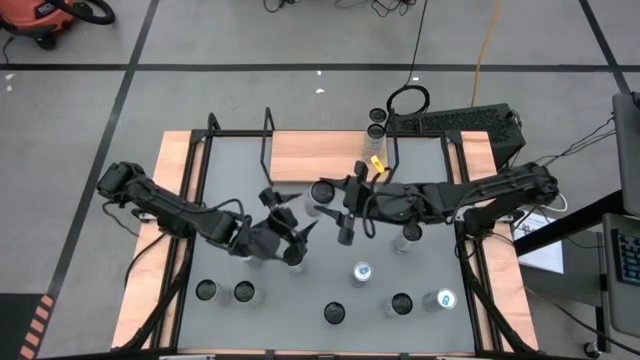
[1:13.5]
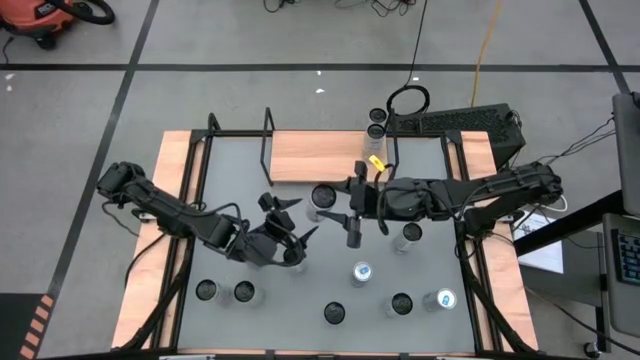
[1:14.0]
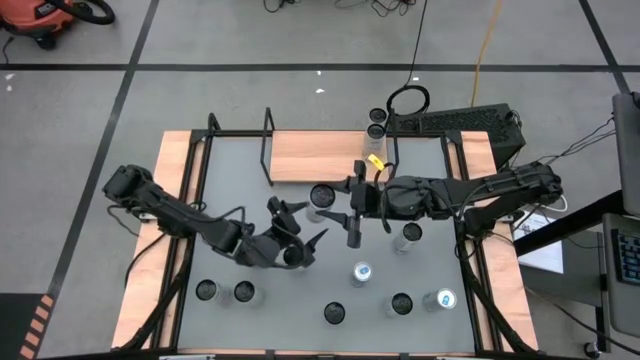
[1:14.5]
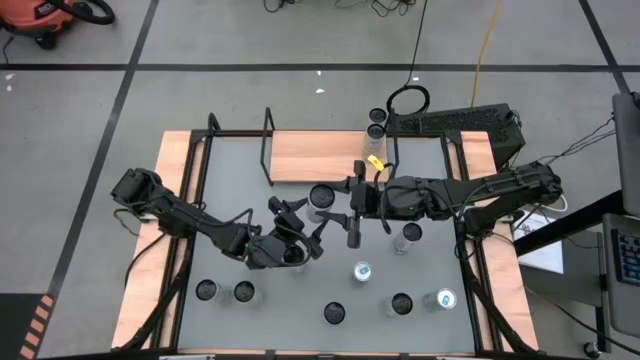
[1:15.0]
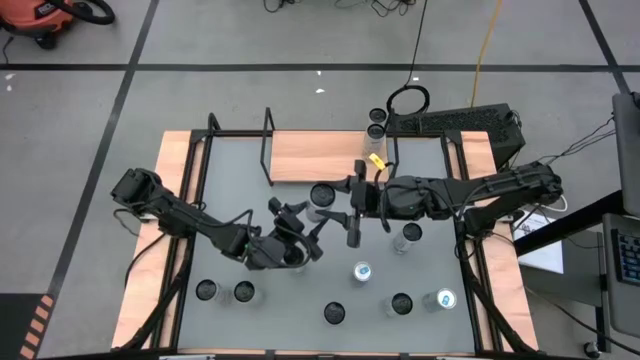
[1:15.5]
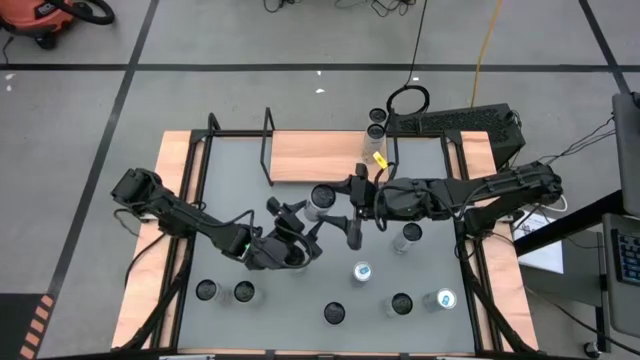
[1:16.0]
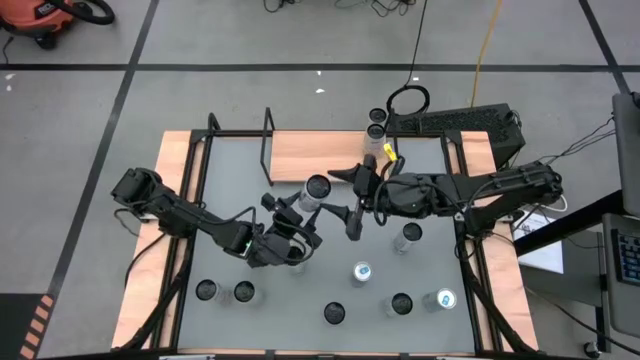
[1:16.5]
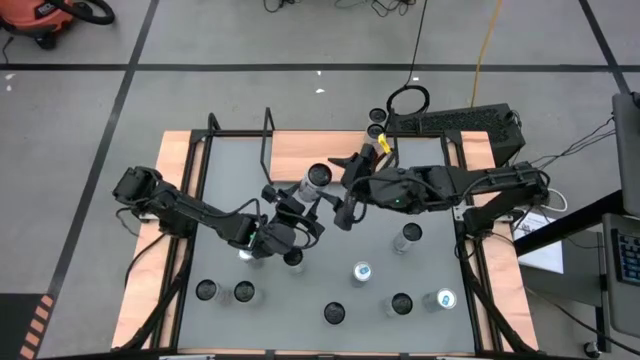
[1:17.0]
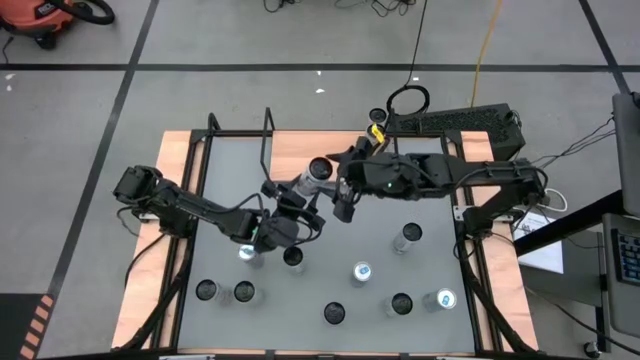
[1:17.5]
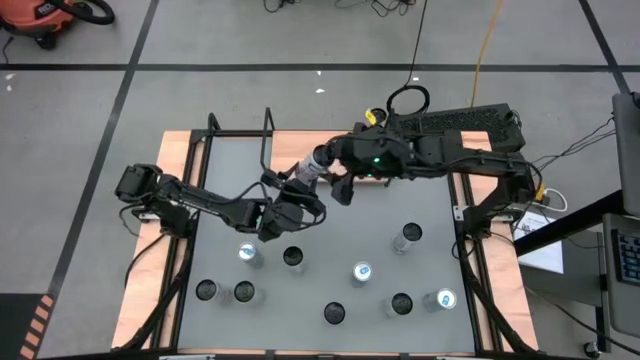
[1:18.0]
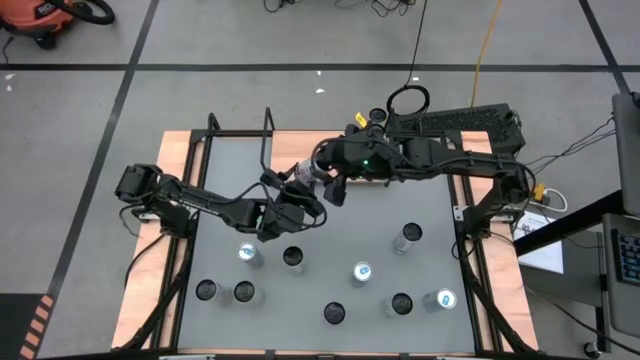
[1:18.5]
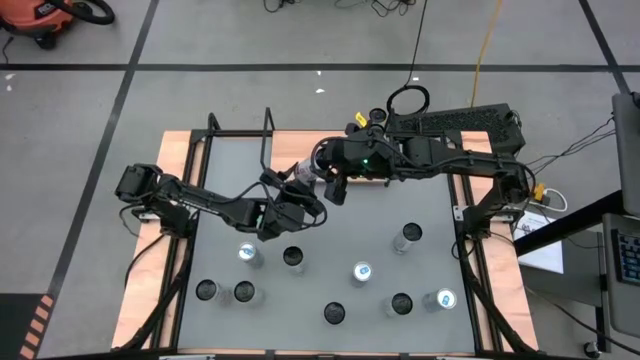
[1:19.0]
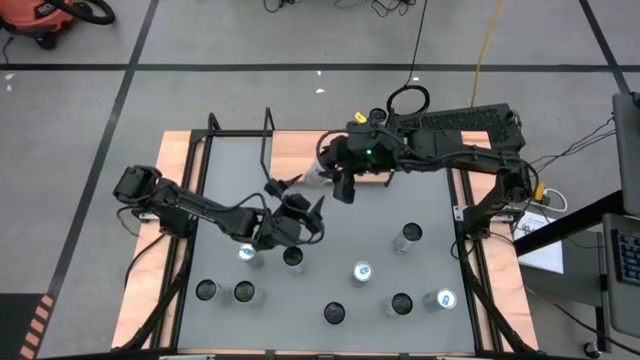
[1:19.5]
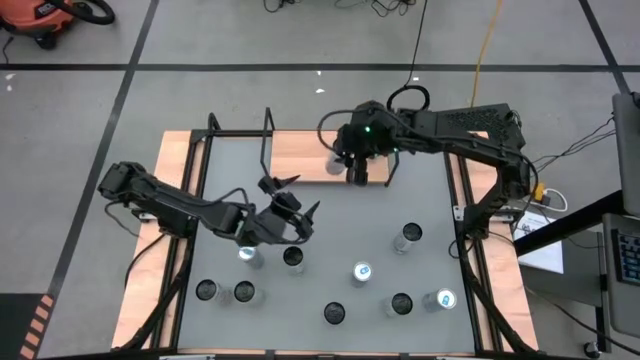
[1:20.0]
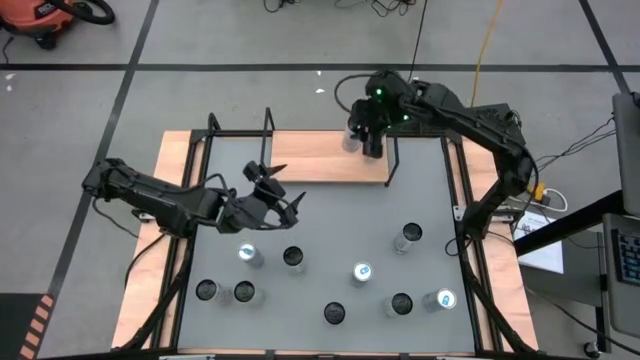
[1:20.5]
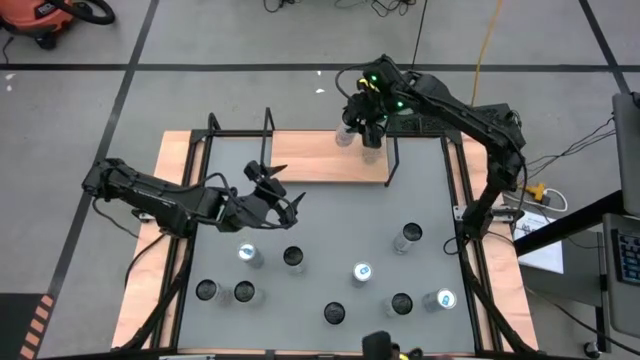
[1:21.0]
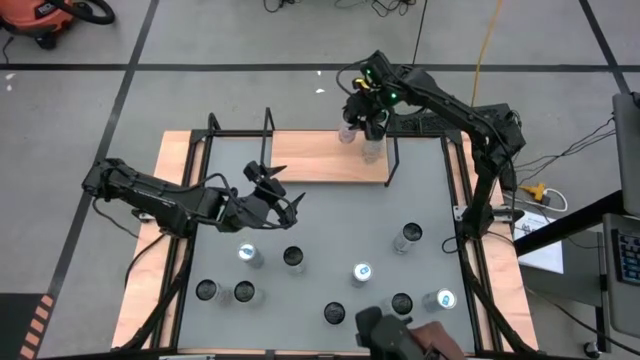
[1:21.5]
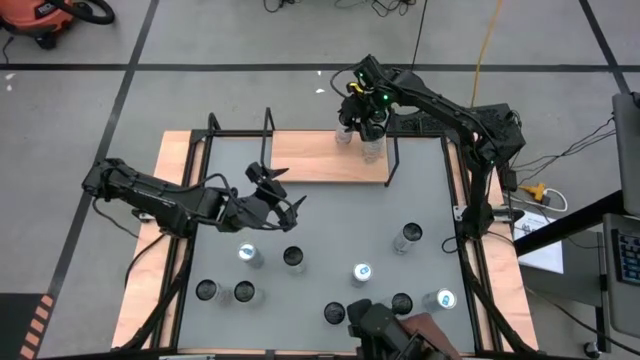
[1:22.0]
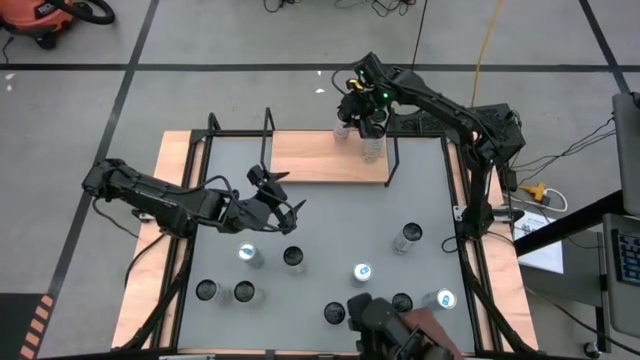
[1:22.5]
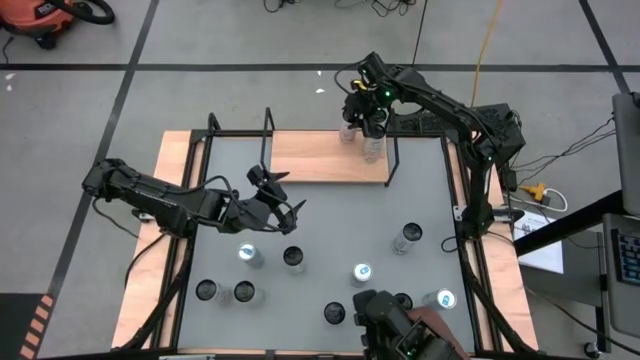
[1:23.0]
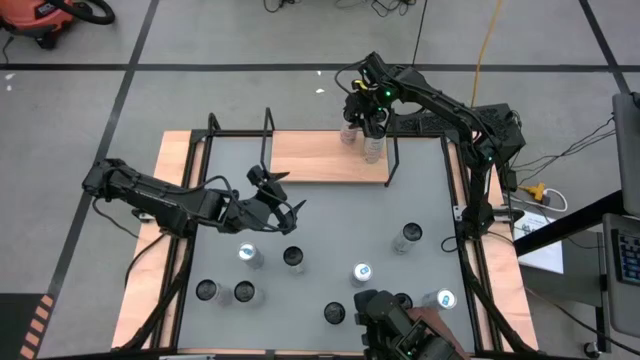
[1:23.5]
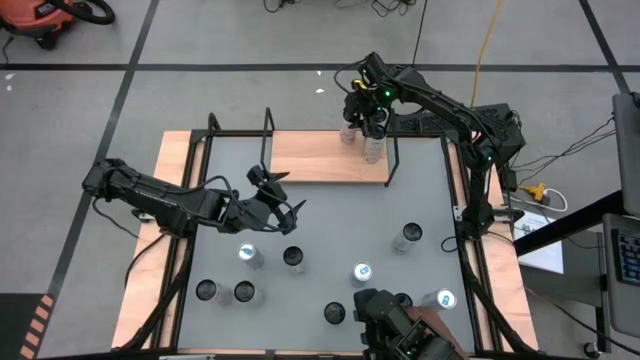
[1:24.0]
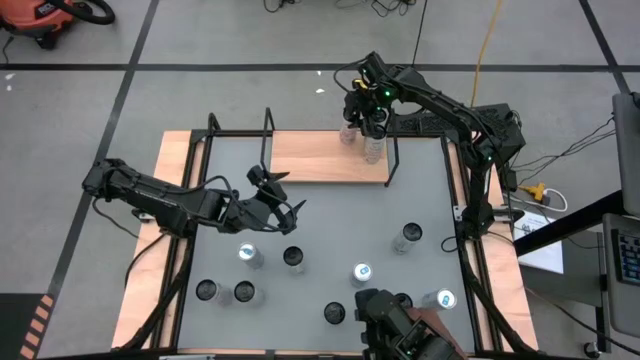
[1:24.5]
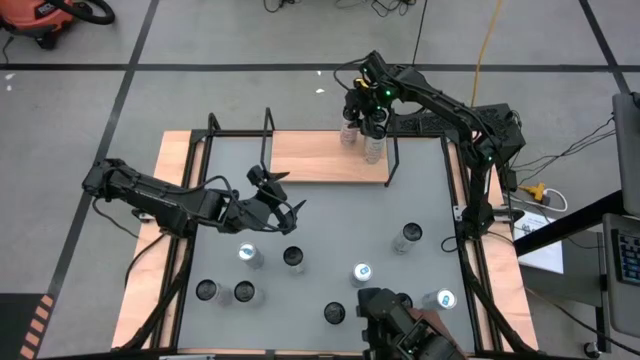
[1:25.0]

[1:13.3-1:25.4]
Task: Place canned beverage on shelf
Put the top white pink soda can on the shelf

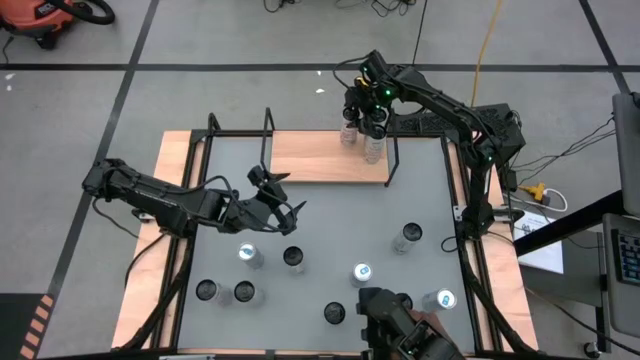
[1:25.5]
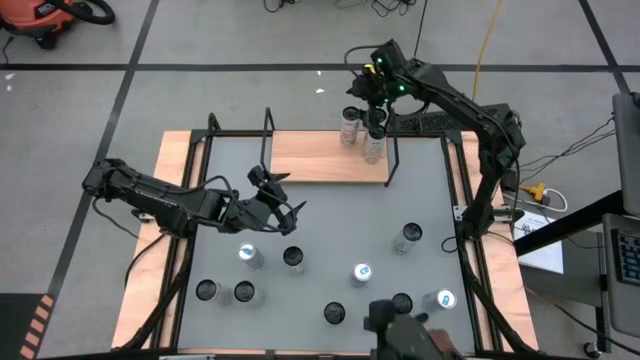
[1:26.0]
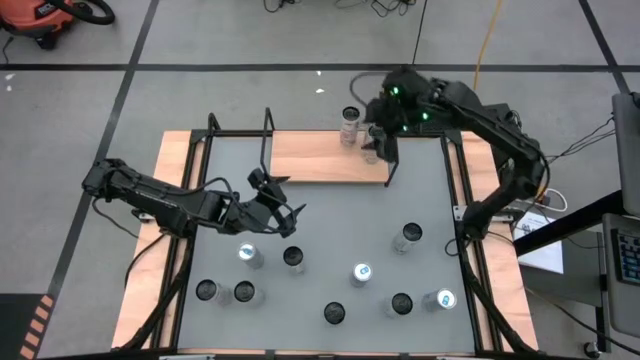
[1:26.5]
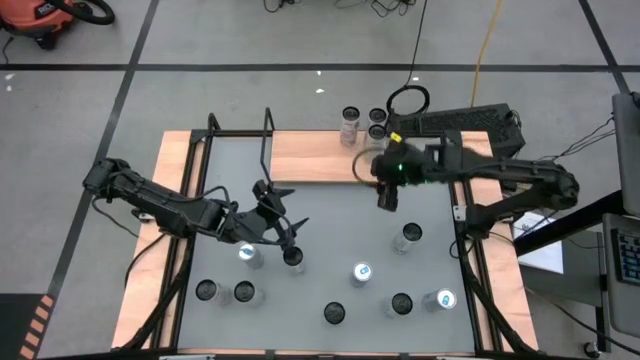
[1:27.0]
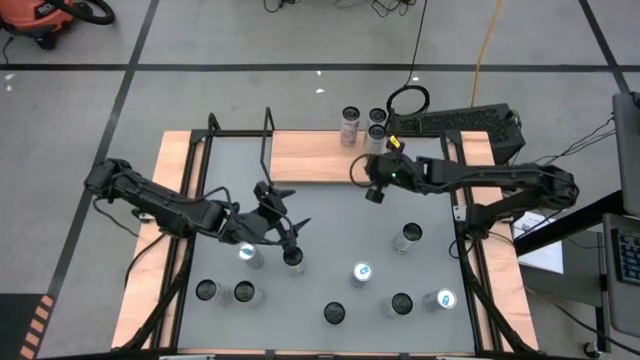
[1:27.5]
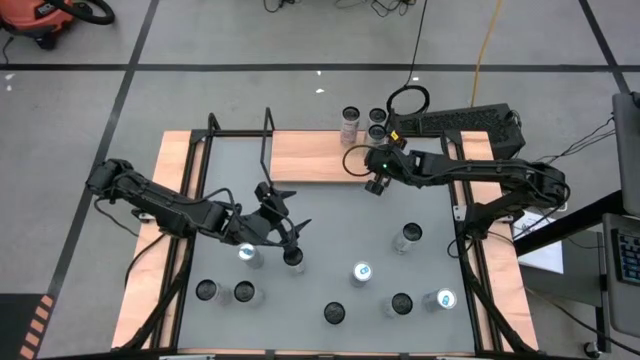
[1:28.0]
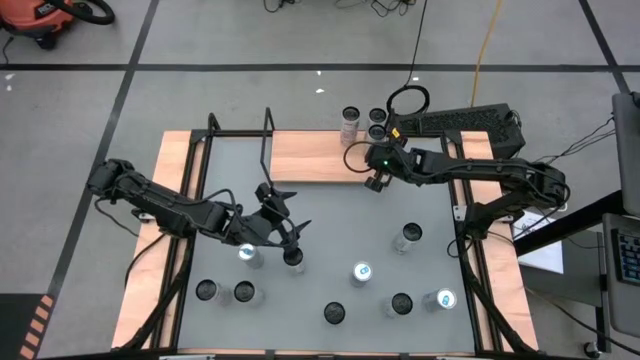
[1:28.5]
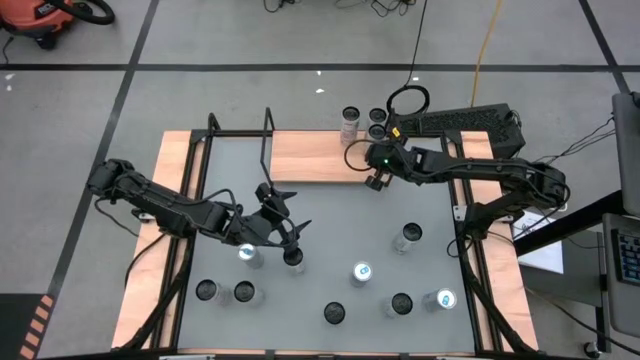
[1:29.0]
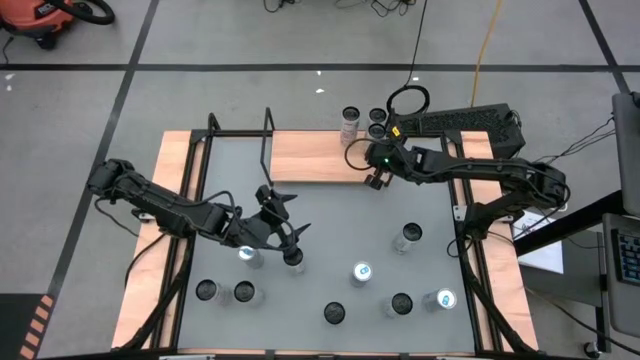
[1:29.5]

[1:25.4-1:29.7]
Adjust the white yellow can on the shelf

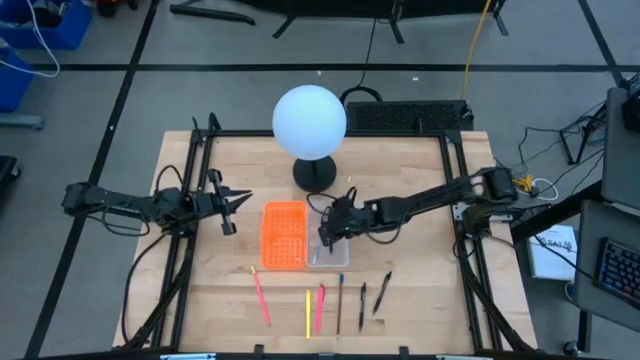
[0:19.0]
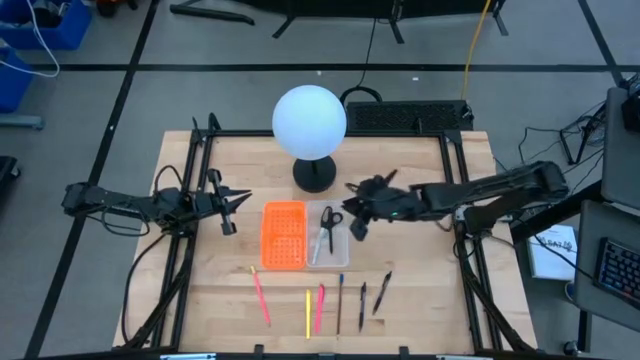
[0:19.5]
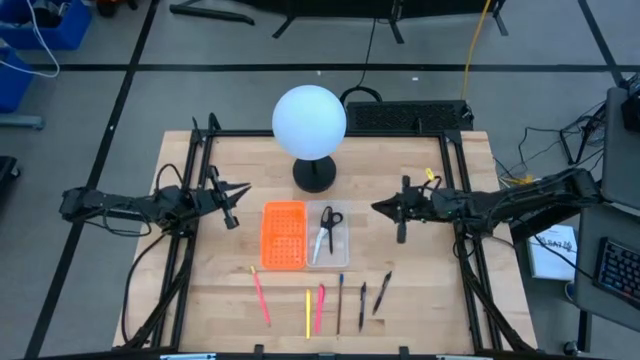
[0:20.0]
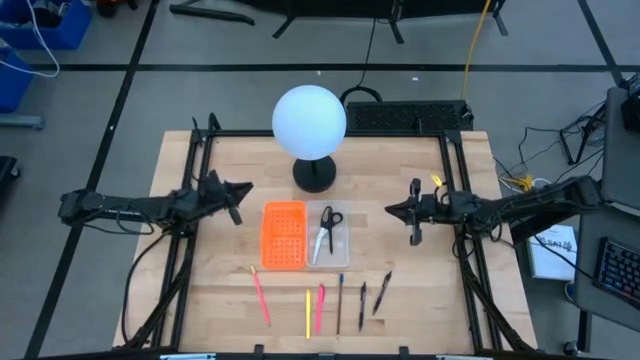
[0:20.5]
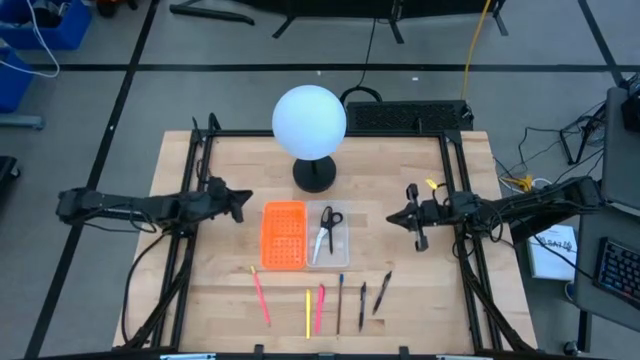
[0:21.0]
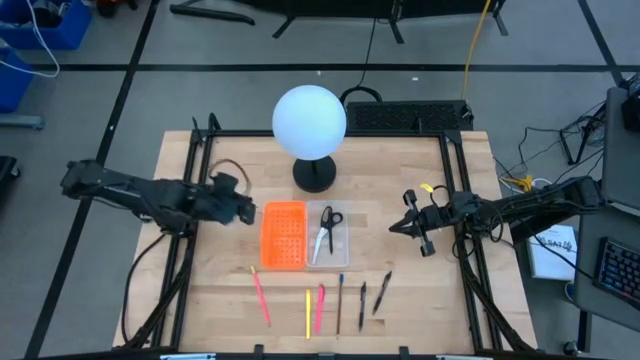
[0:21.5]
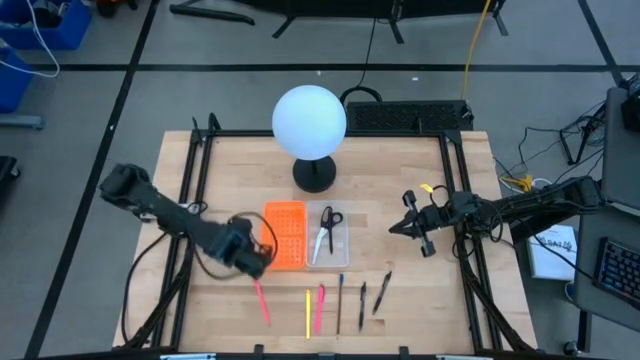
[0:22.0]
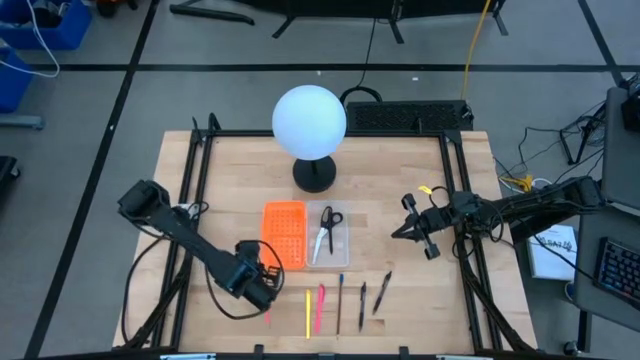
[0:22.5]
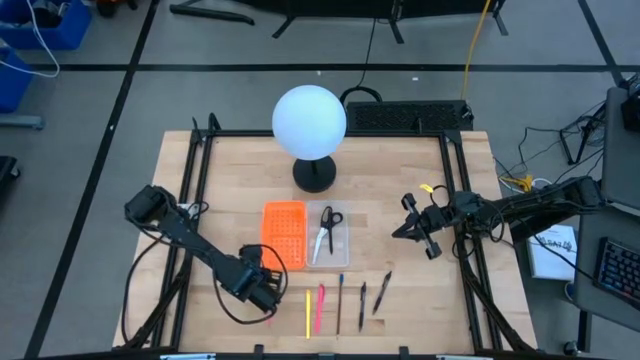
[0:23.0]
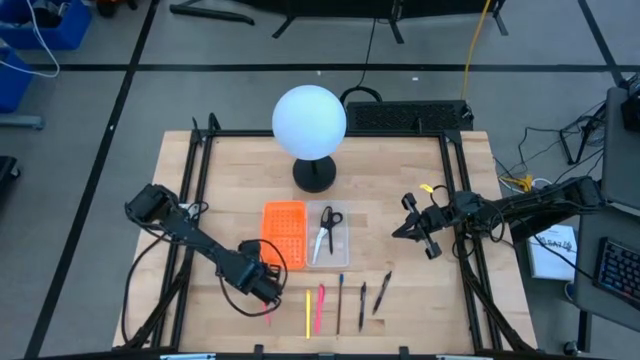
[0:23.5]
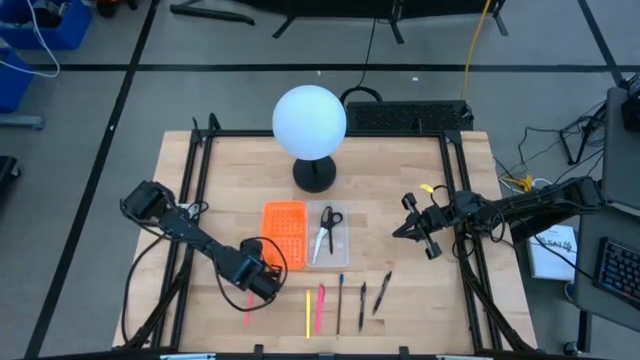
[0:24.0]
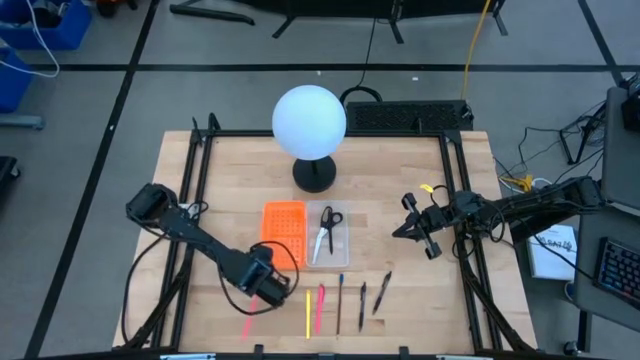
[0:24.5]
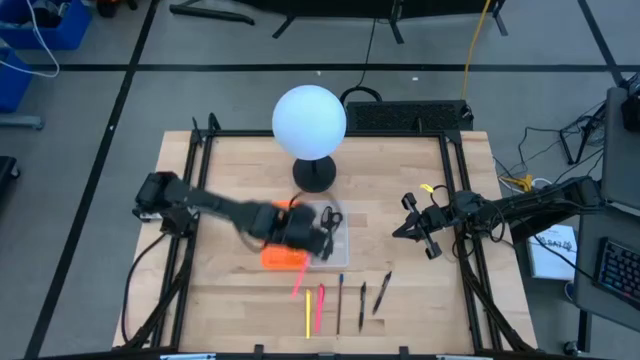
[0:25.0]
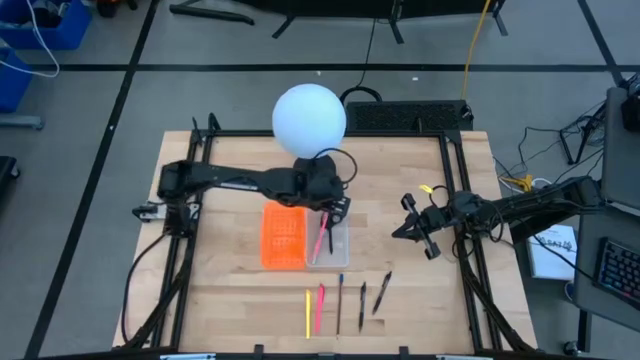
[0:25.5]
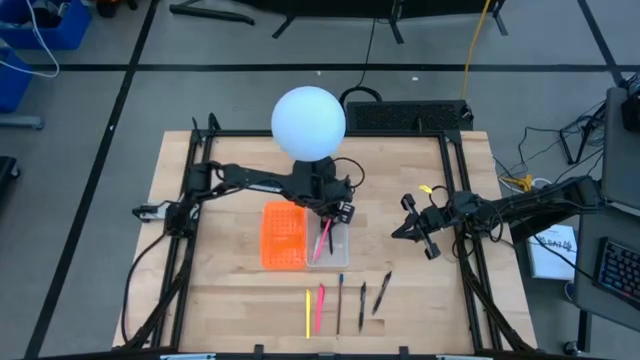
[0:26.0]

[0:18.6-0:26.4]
Task: Pick & place school supplies into a supply box
Put the pink pencil into the pencil box
